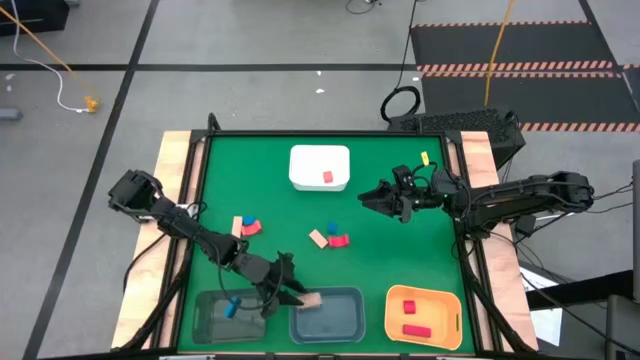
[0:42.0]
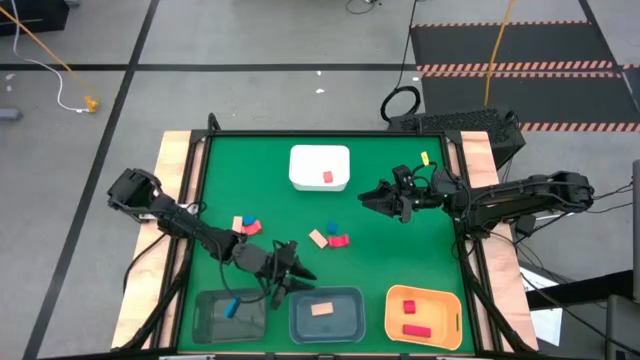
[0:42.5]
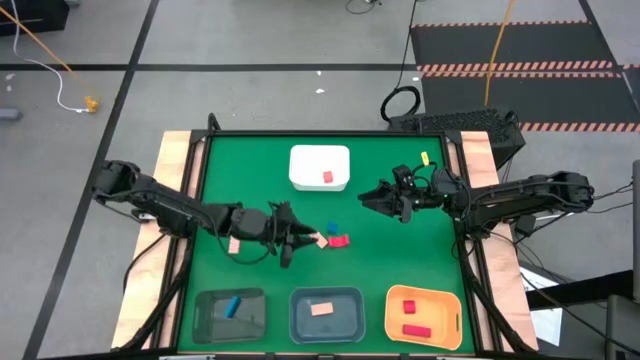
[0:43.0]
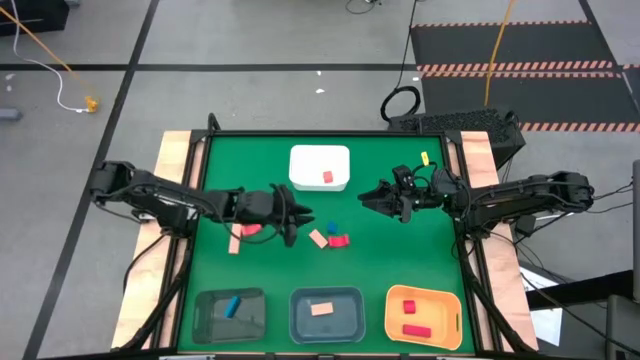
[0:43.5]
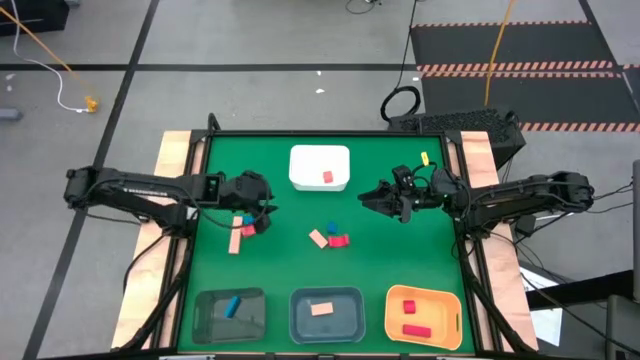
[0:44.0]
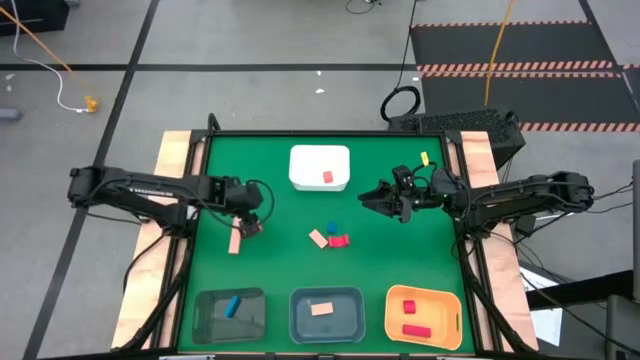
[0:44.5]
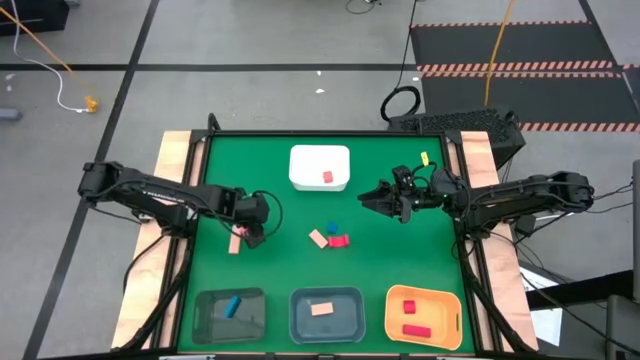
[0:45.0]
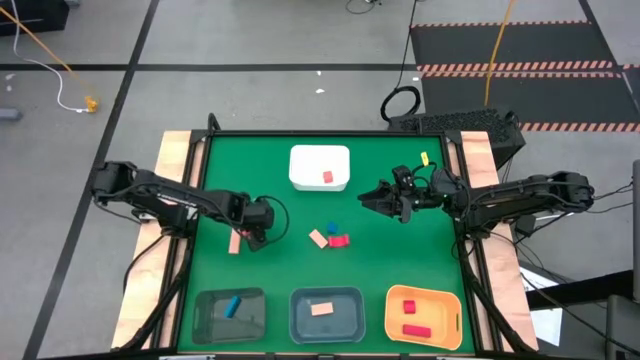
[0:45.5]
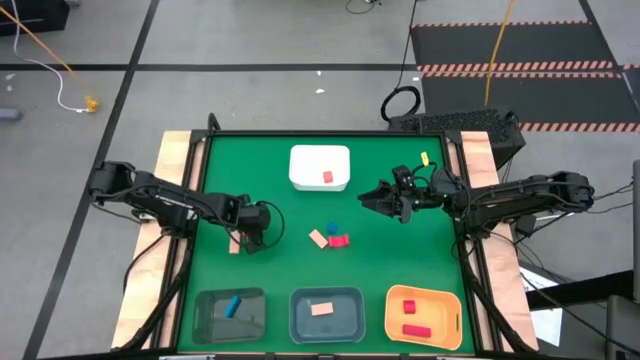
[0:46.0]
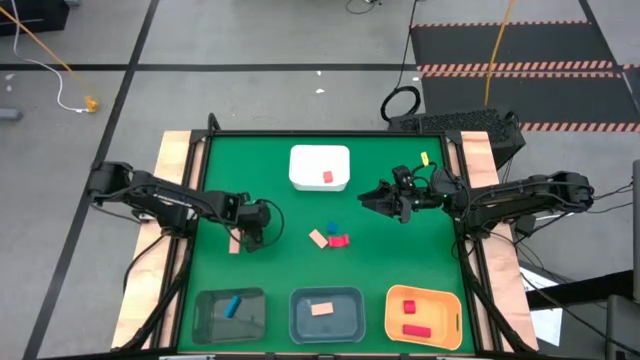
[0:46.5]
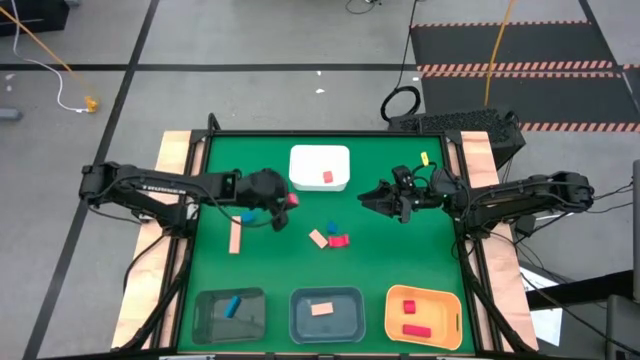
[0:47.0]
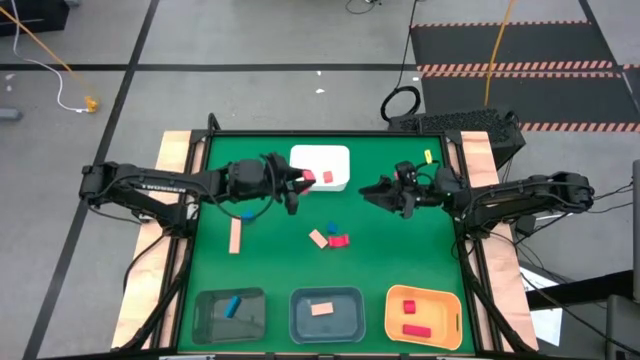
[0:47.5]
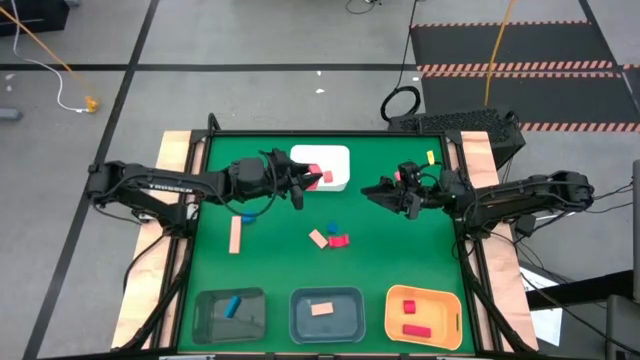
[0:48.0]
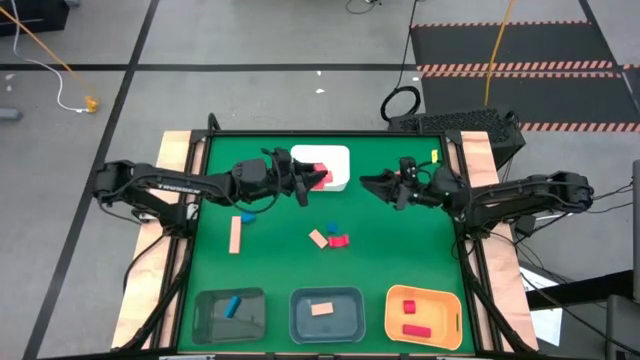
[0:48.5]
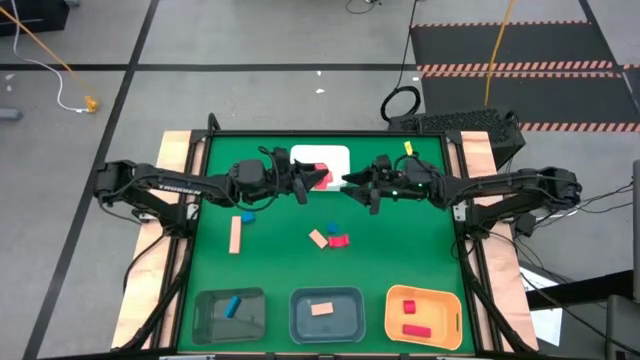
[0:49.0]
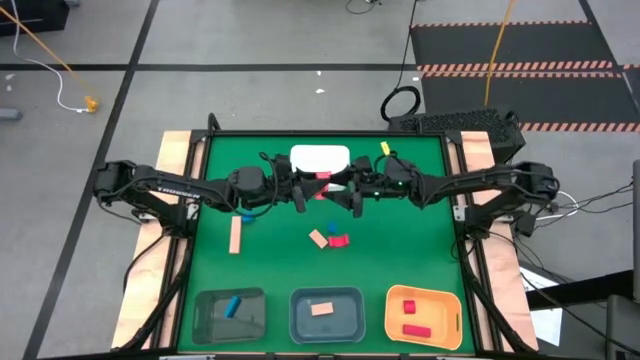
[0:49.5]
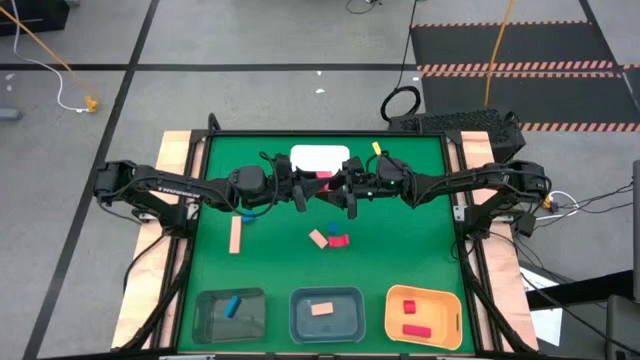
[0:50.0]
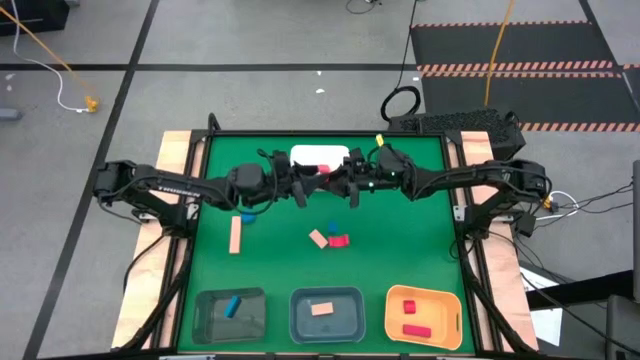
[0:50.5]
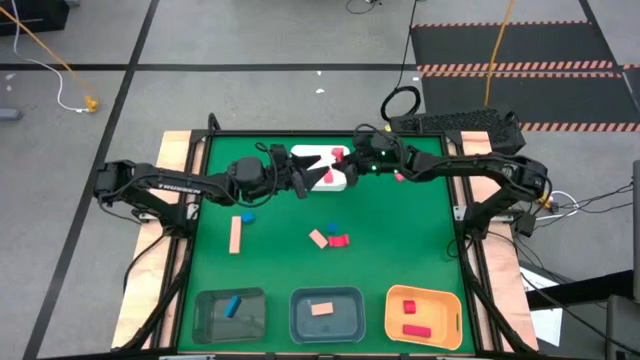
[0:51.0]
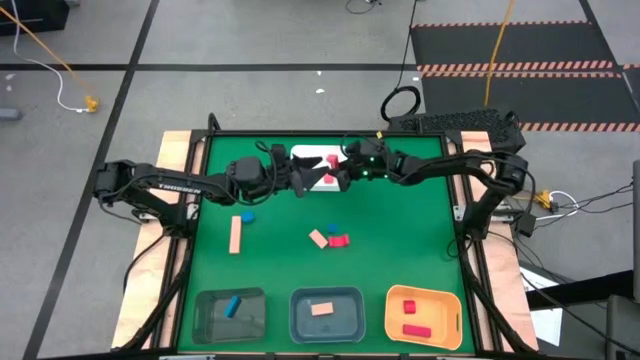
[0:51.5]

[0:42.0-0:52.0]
Task: Sort & place blocks by color
Put the left orange block into the white bin

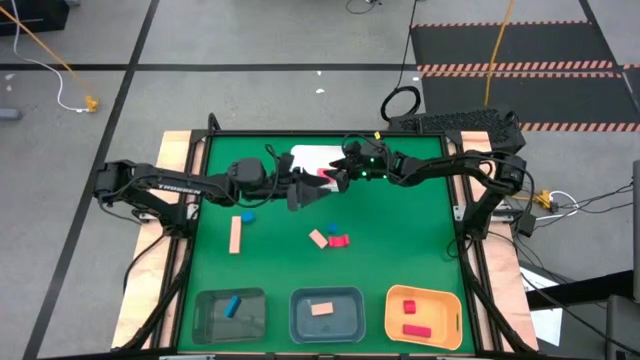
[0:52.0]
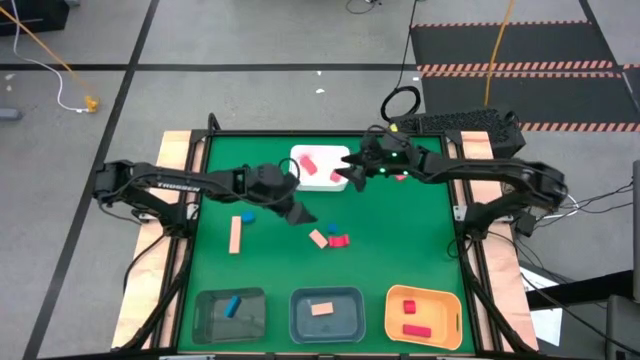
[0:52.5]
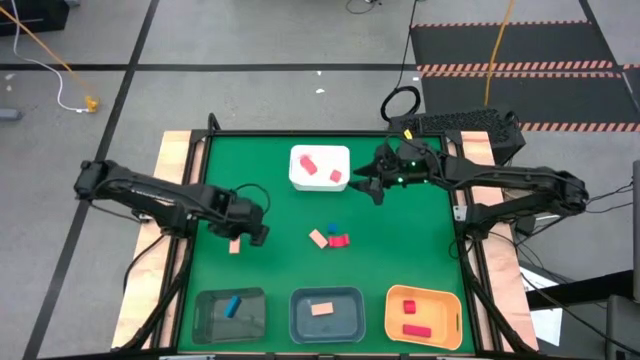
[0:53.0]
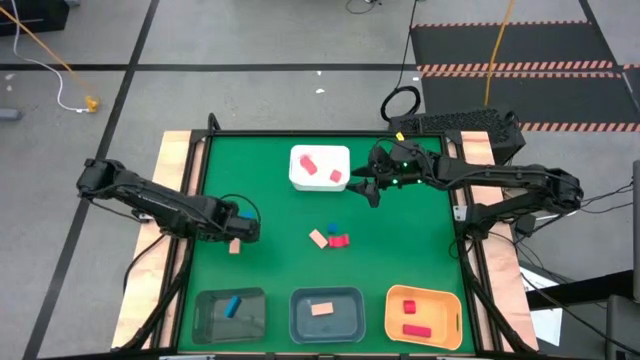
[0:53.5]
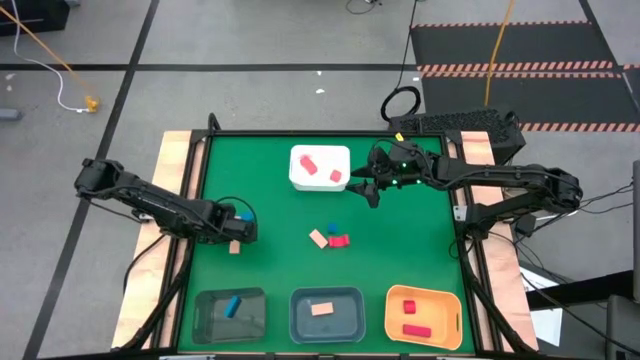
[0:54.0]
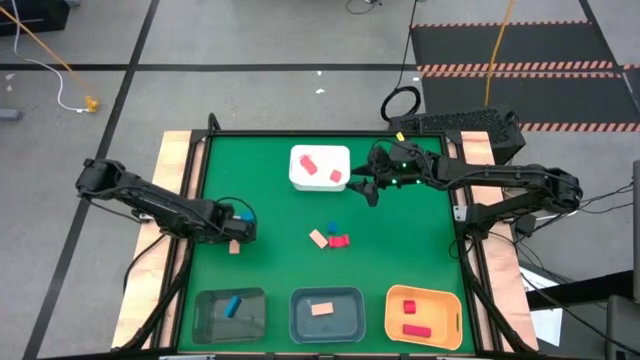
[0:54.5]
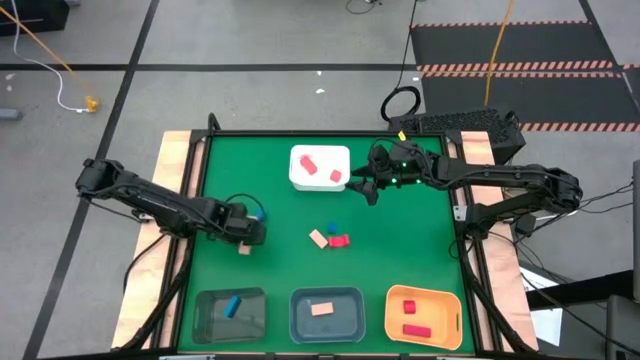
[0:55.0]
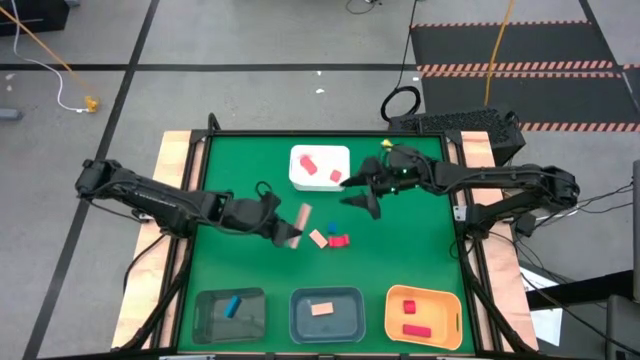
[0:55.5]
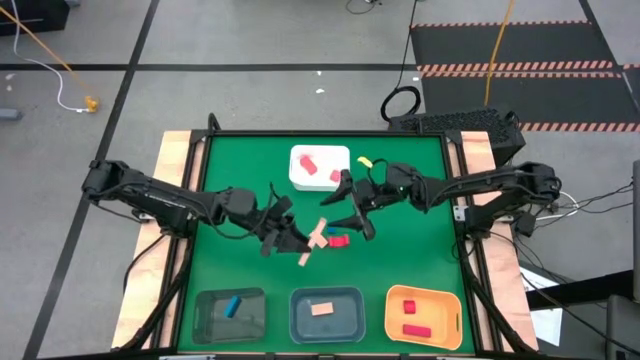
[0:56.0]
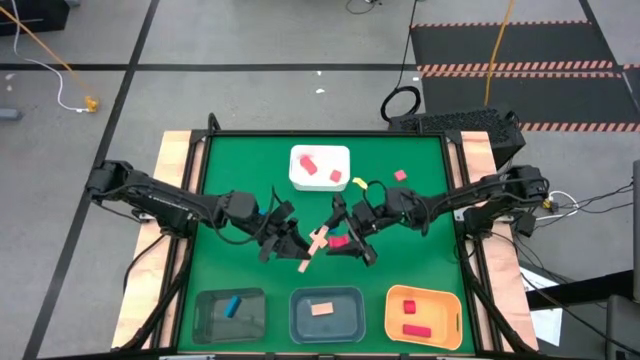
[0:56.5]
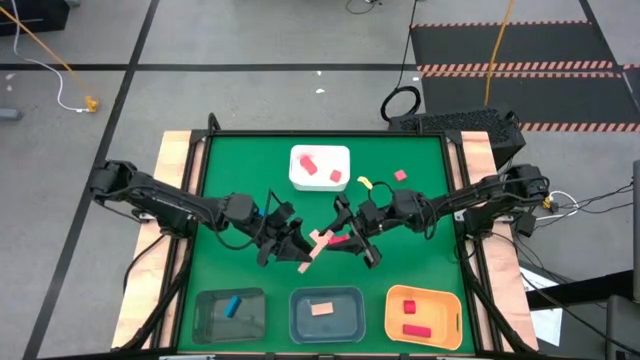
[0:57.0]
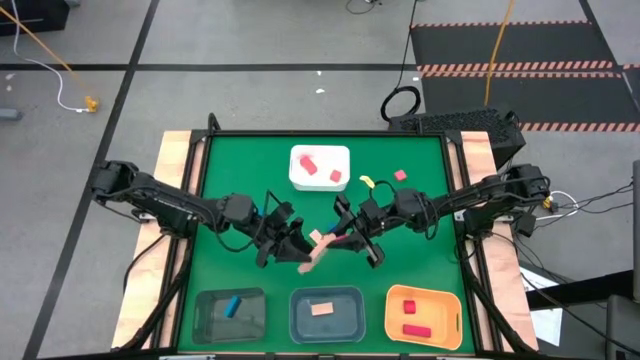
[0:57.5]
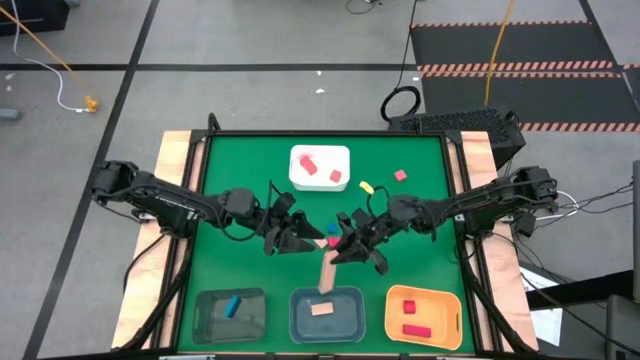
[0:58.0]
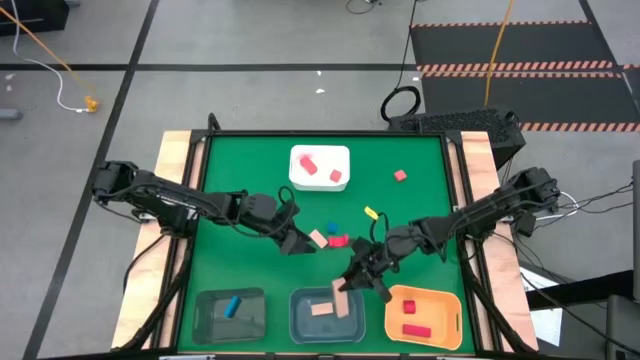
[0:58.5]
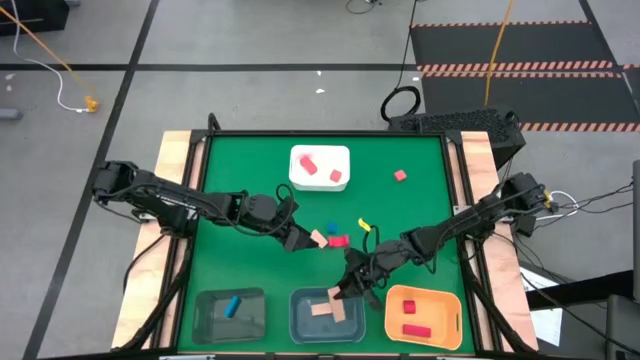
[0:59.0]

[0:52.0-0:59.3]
Put the left yellow block into the blue bin

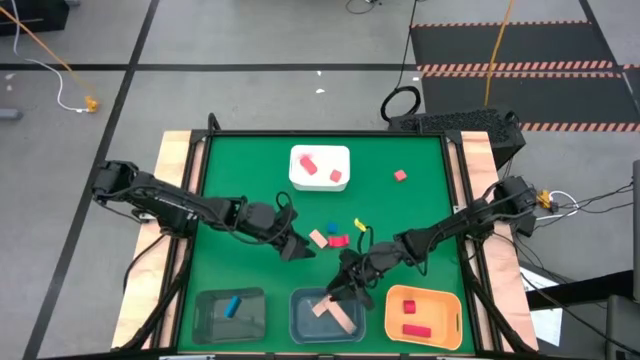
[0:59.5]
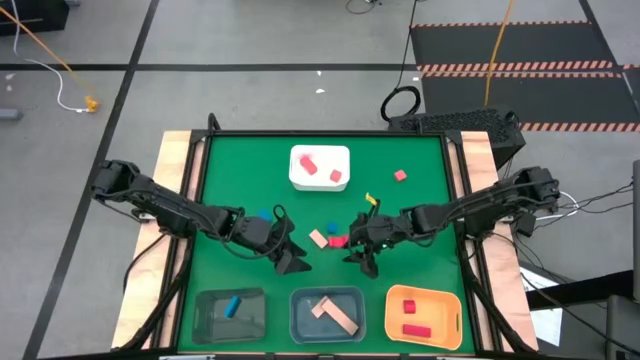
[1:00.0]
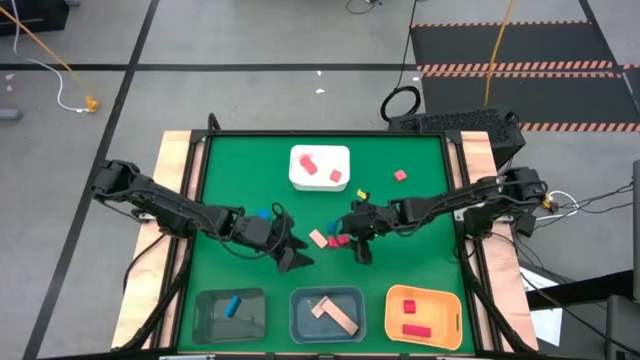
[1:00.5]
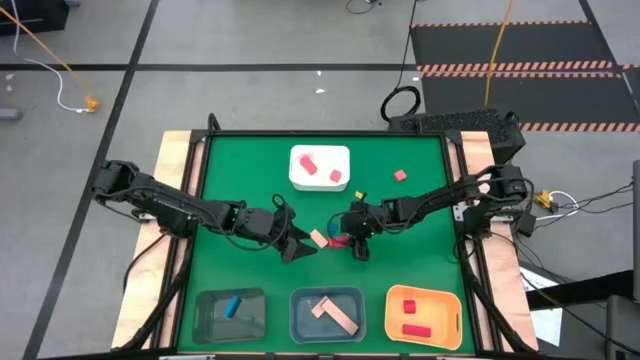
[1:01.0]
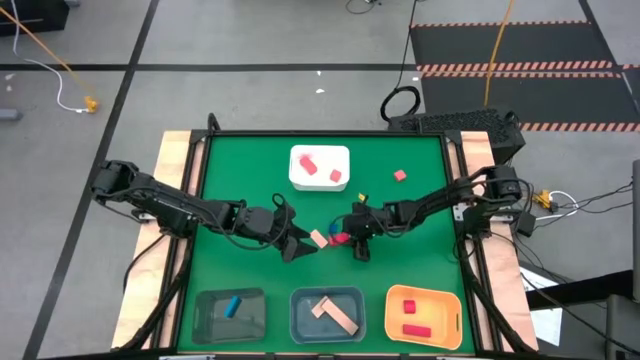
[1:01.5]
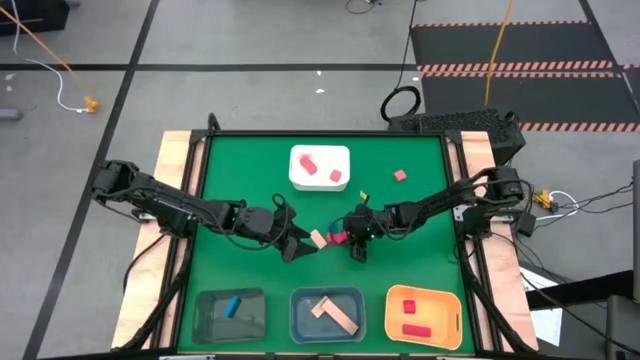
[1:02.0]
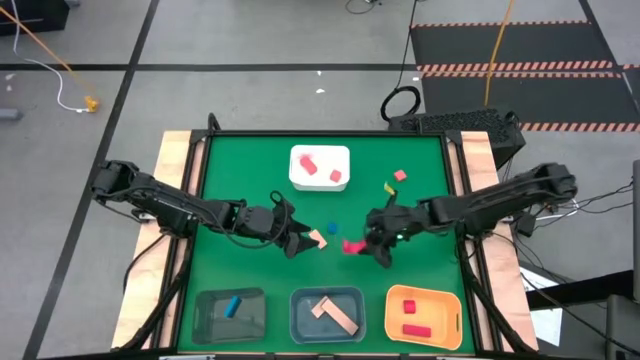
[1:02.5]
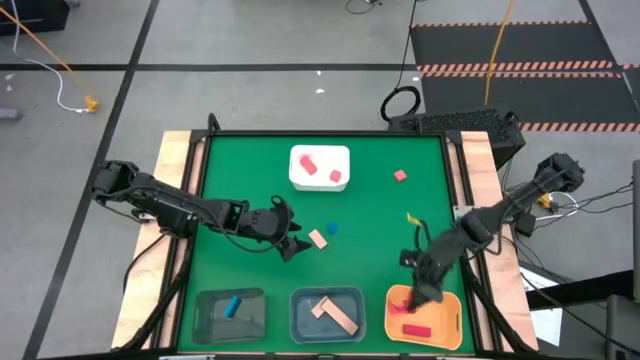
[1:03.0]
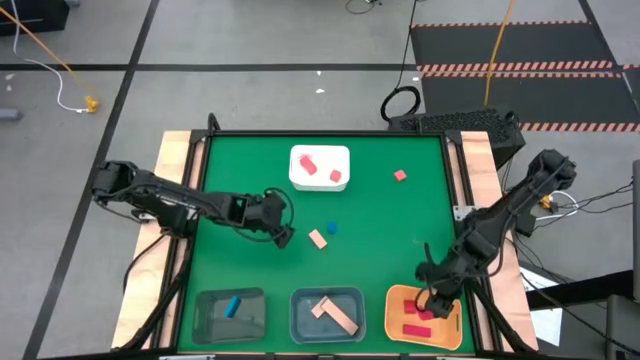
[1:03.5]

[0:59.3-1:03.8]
Put the red block into the yellow bin
